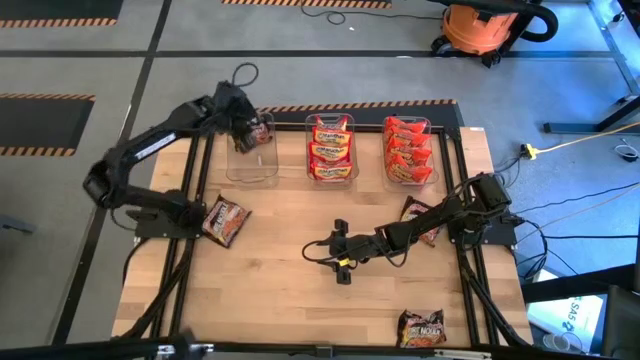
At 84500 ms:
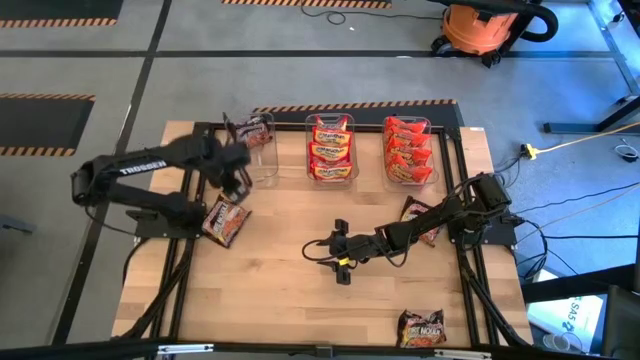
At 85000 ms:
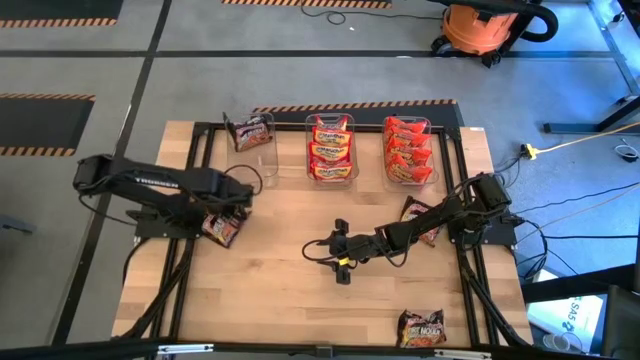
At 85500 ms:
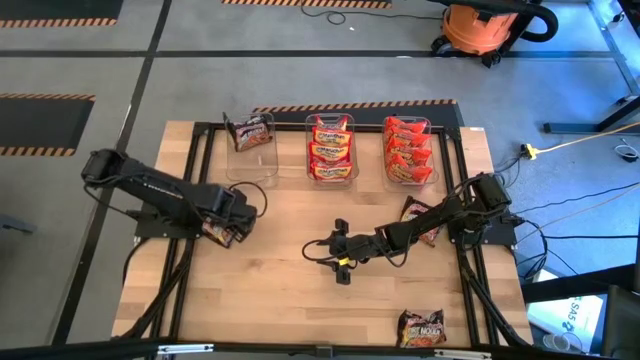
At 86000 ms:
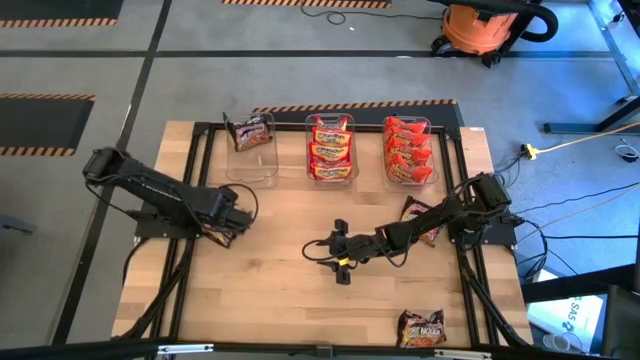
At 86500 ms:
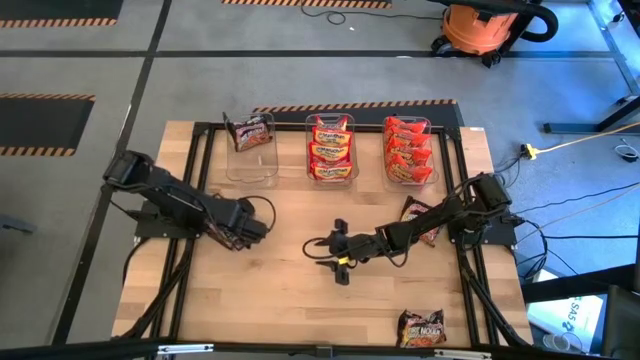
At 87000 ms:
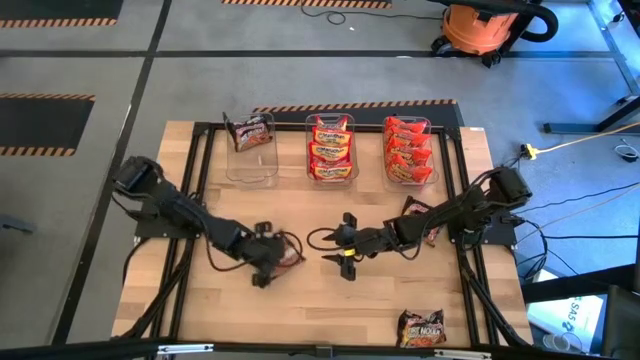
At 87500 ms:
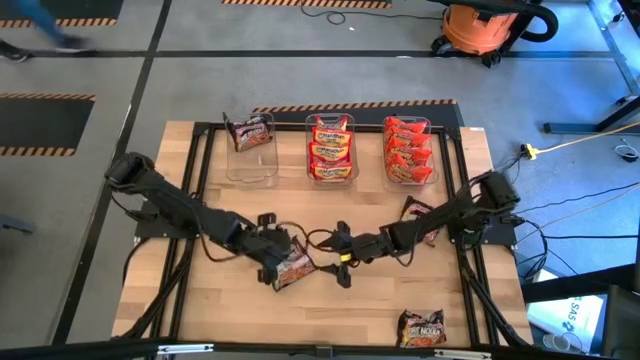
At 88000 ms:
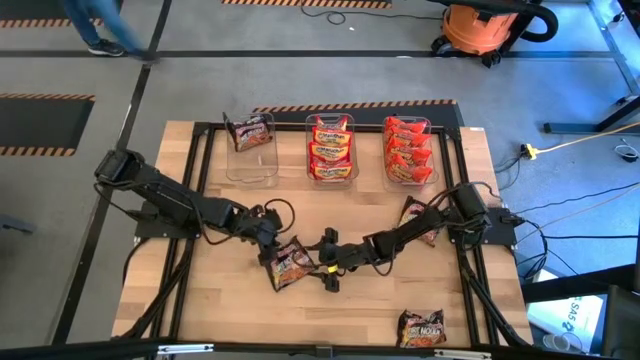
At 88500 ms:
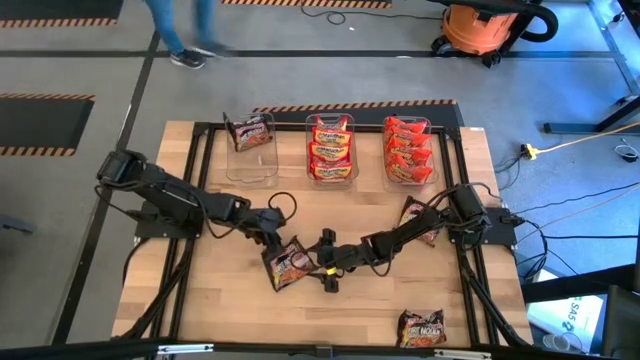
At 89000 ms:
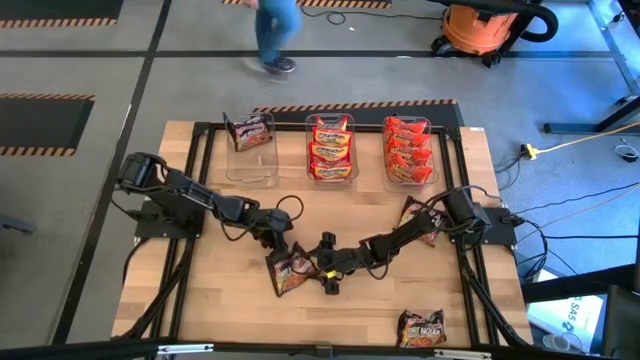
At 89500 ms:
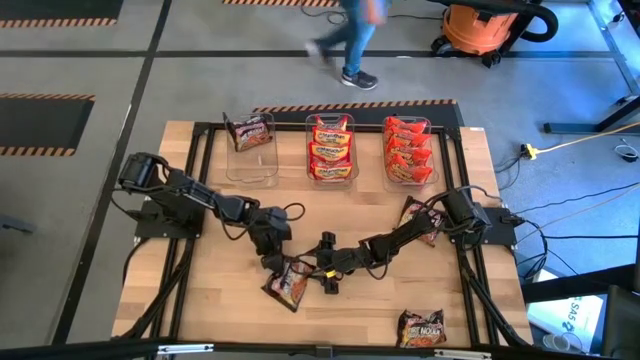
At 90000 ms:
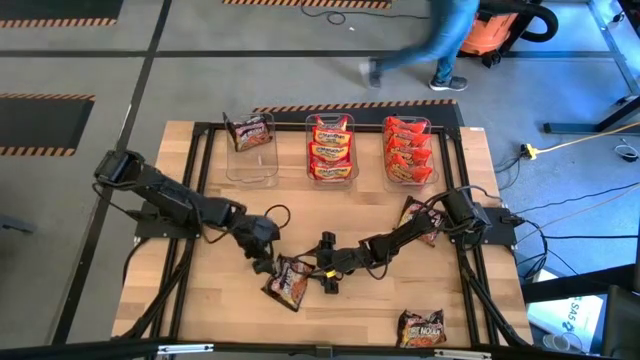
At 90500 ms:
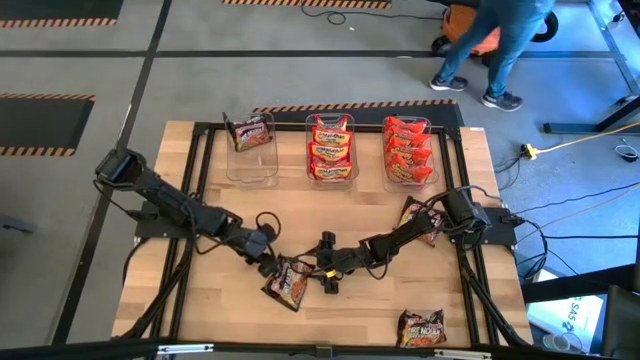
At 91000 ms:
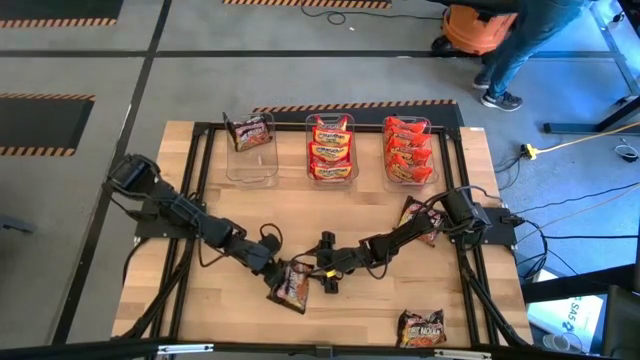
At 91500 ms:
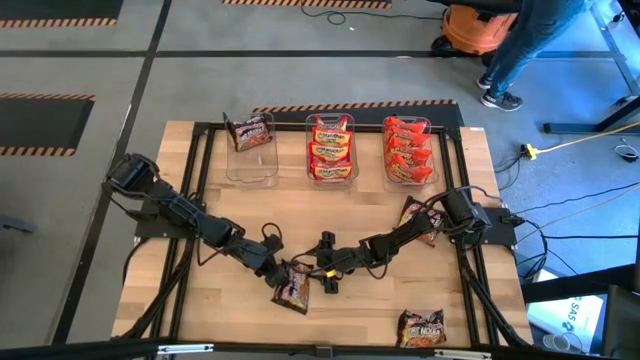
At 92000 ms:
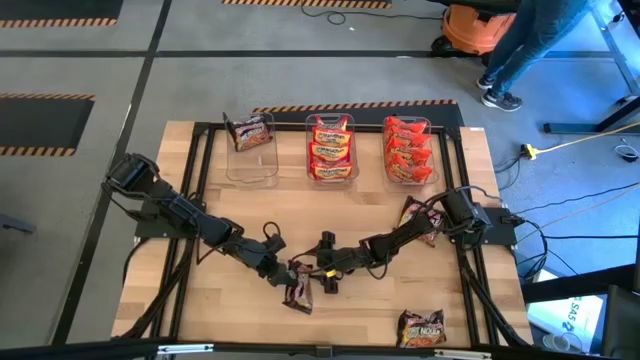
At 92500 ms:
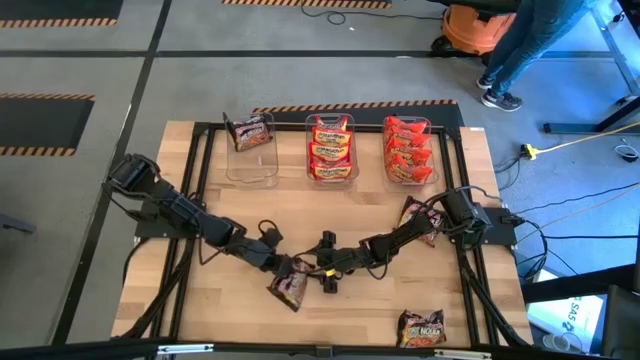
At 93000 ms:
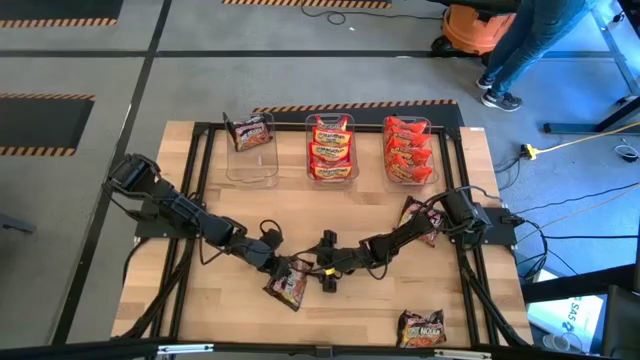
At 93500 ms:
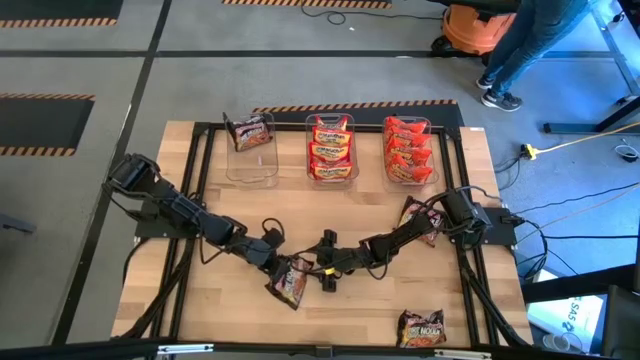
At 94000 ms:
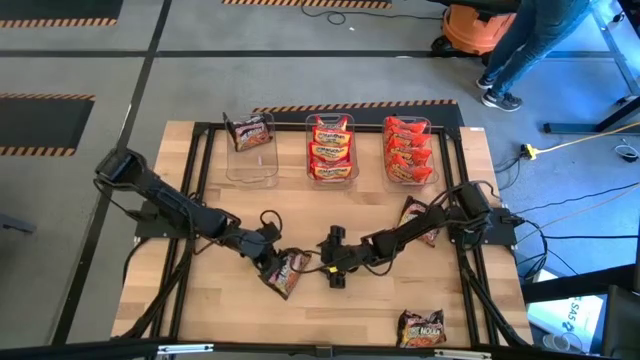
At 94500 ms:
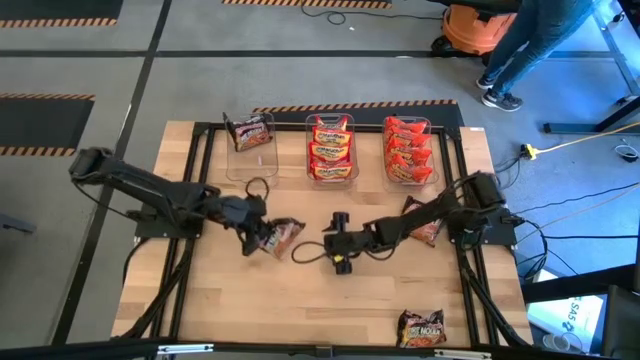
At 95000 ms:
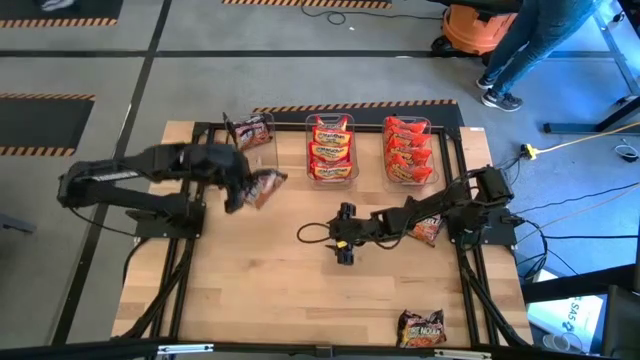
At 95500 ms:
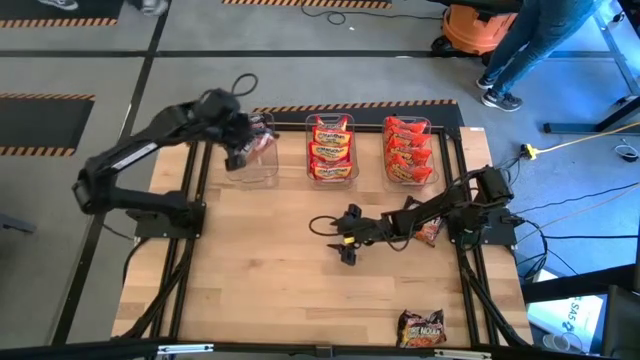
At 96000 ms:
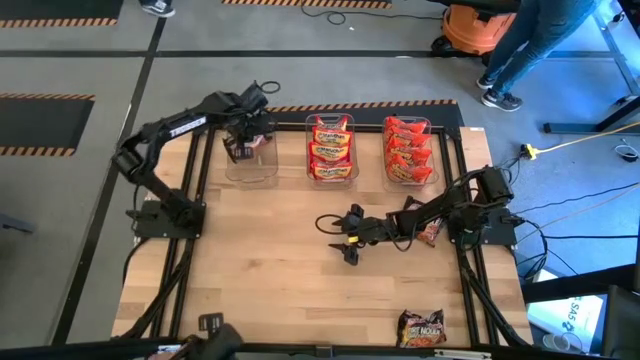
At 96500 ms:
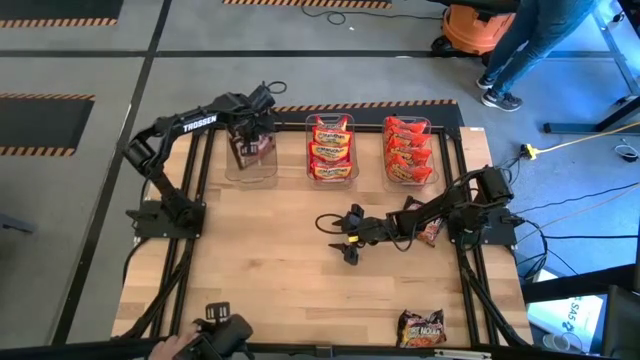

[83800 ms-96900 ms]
Task: Sort Maruchan noodles
Put the black noodle pack into the left transparent bin

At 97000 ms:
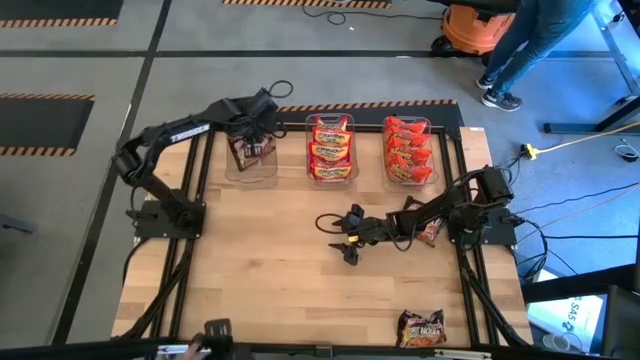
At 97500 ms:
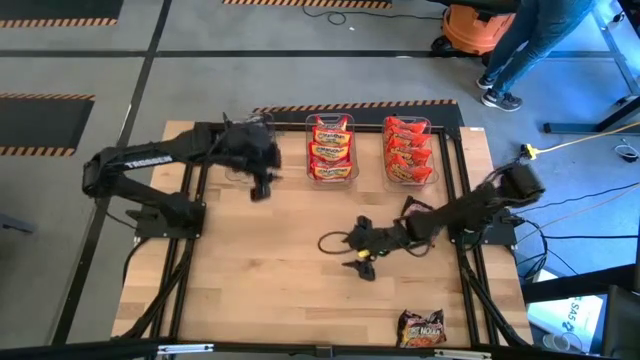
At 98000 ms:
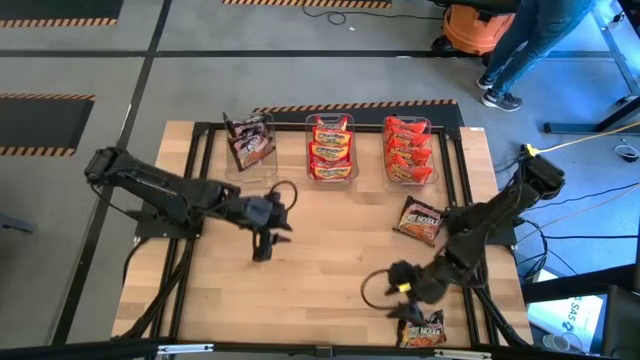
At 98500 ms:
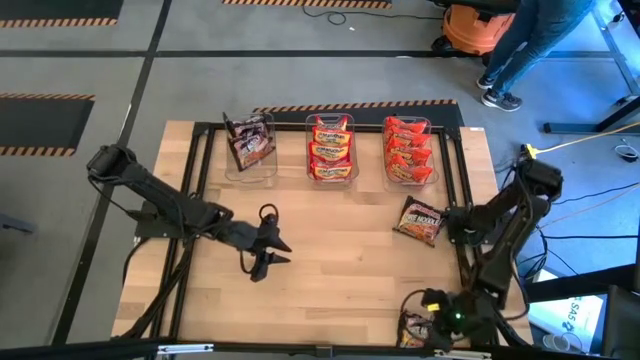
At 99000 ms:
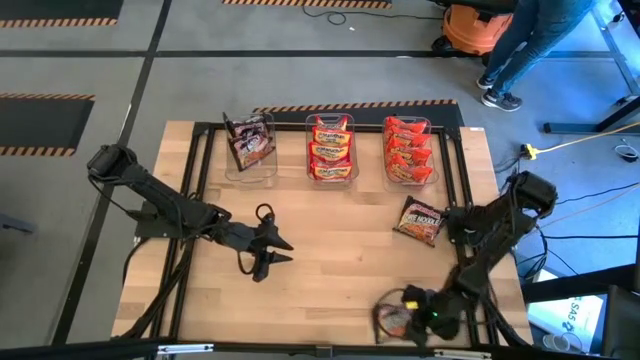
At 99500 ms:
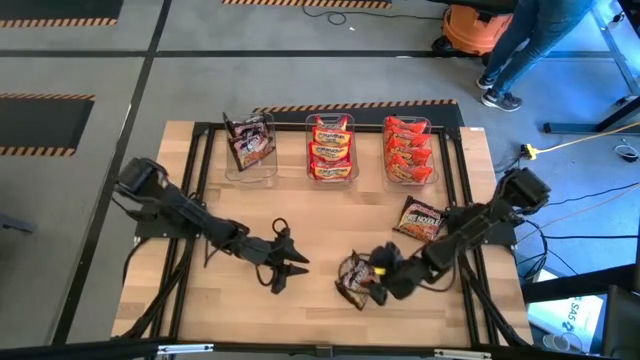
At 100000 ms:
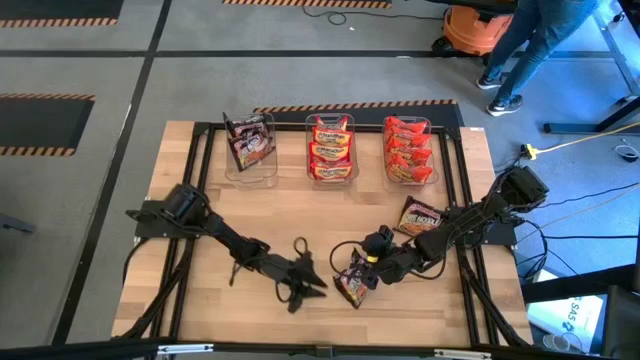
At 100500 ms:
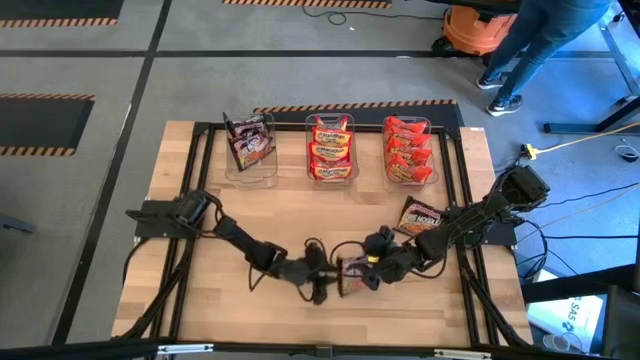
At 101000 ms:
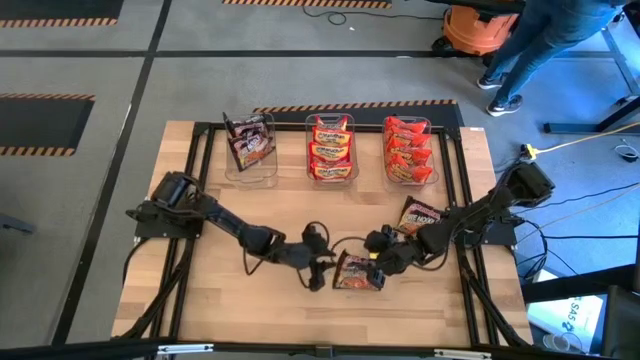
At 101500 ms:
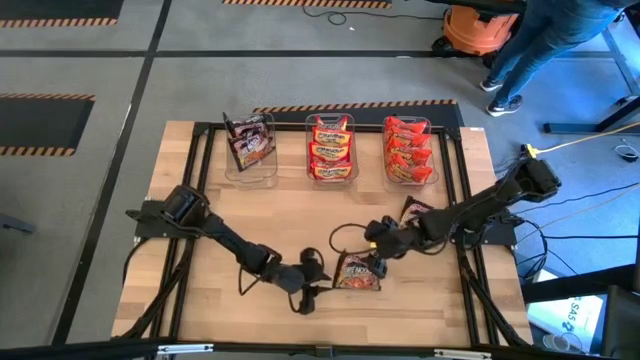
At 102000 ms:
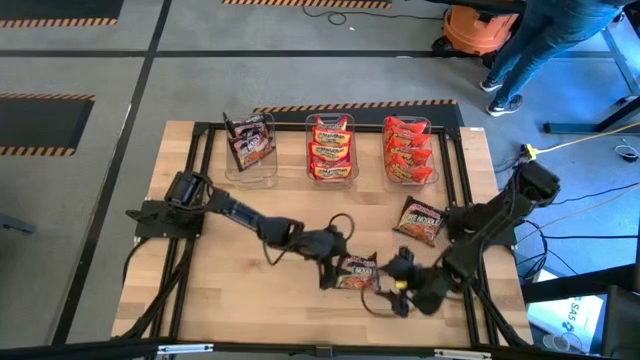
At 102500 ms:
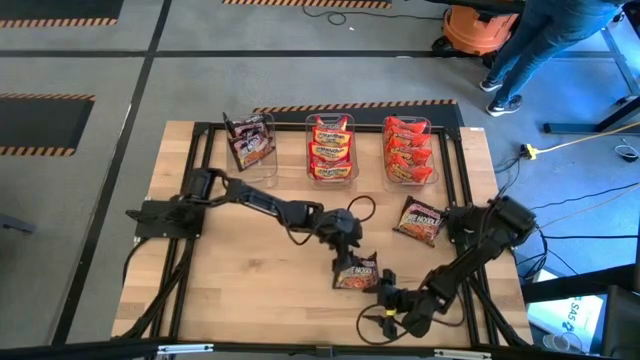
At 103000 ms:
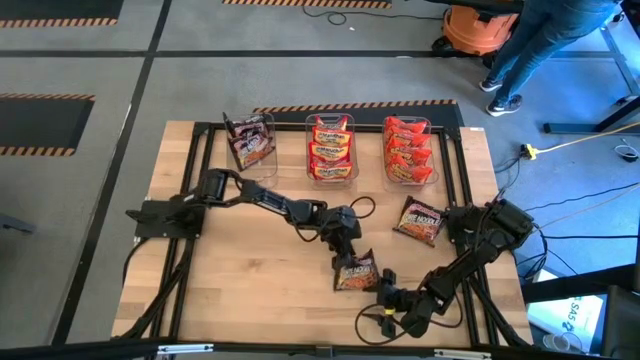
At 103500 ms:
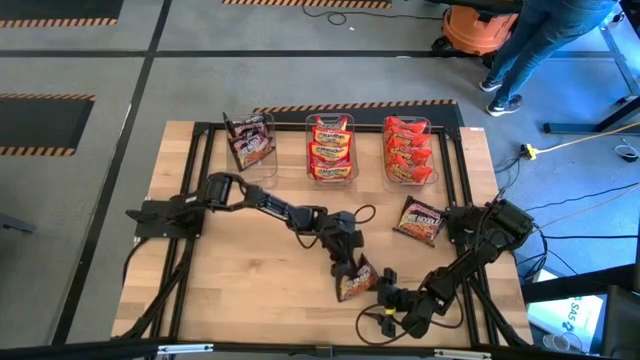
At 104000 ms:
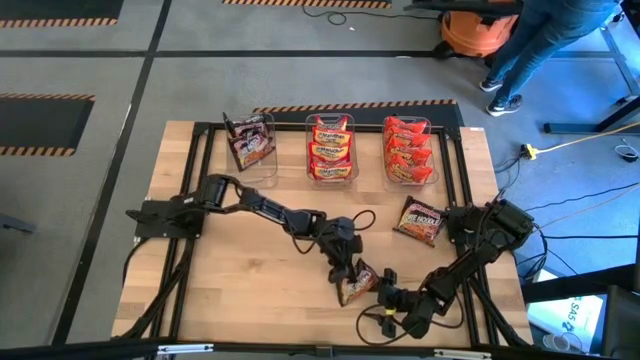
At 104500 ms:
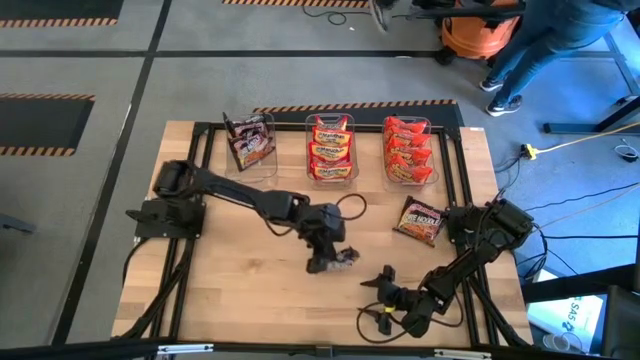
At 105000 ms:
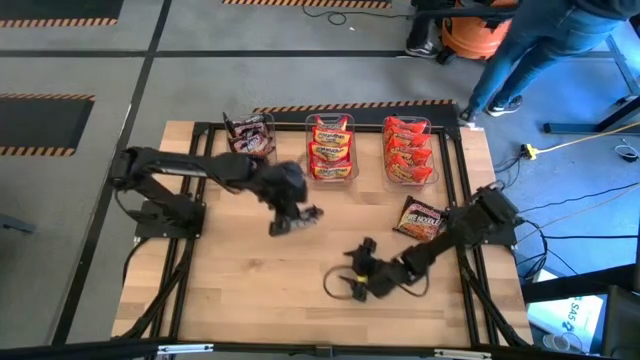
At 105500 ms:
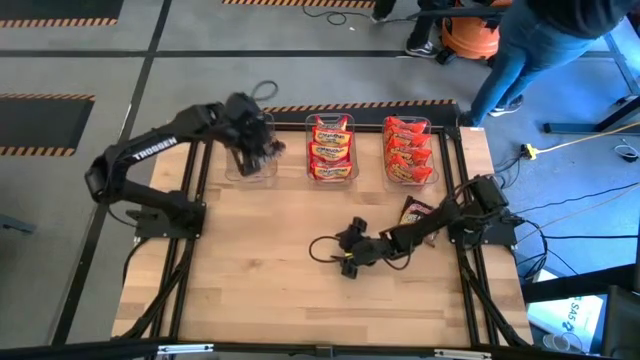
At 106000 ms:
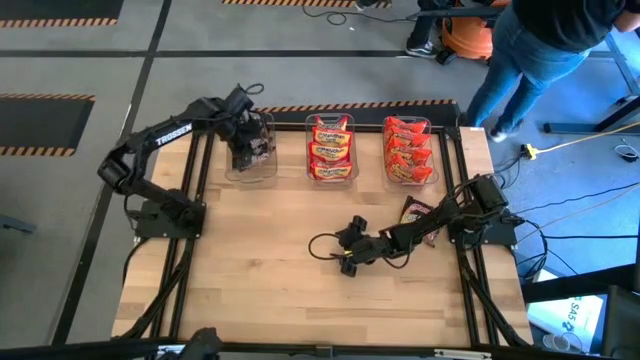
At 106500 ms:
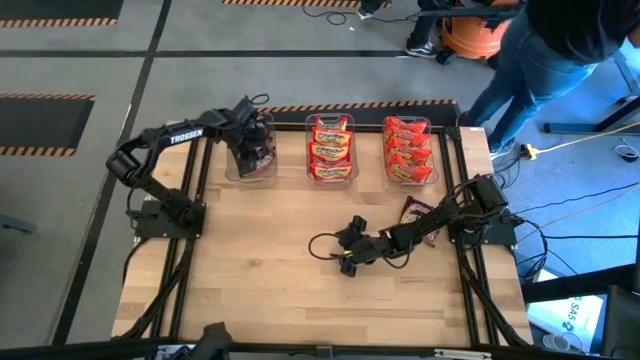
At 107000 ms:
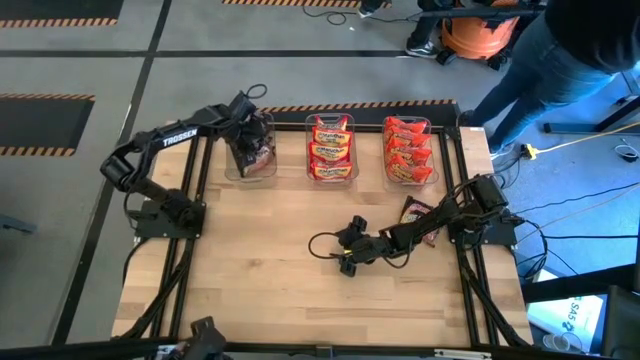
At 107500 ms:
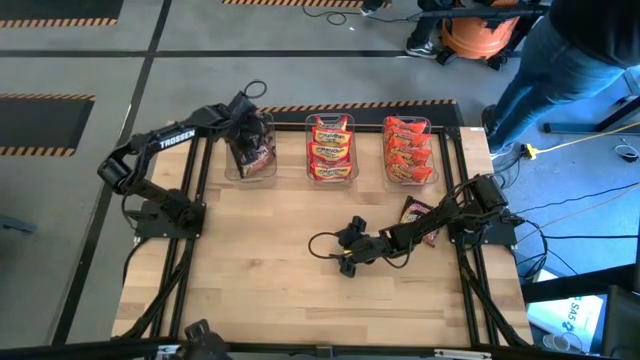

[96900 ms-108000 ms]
Put the black noodle pack into the left transparent bin
